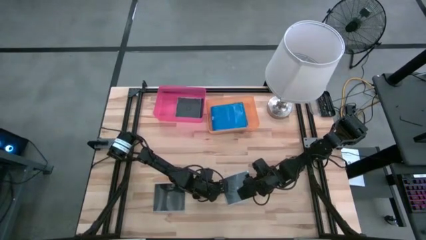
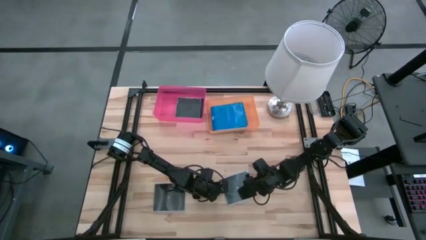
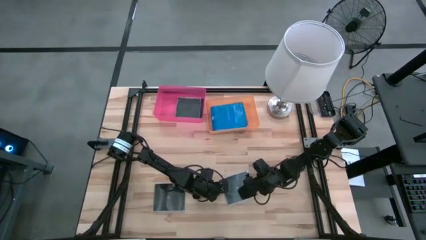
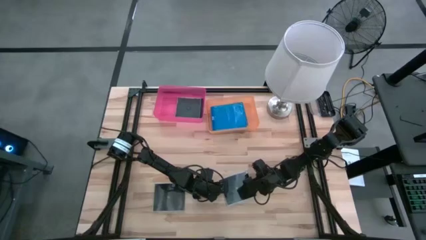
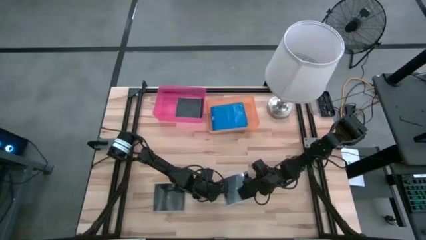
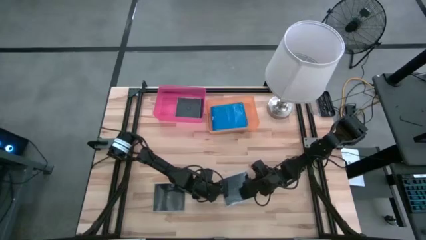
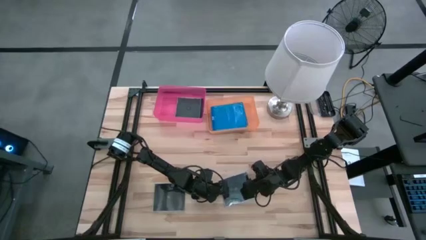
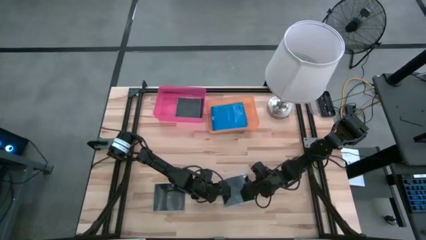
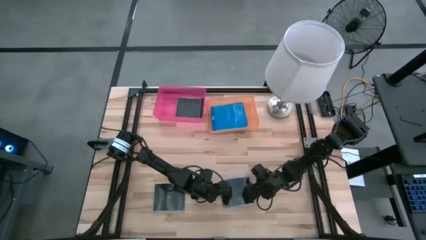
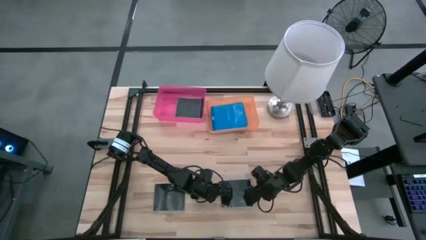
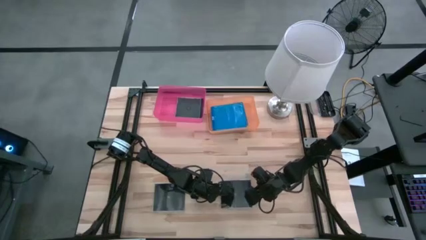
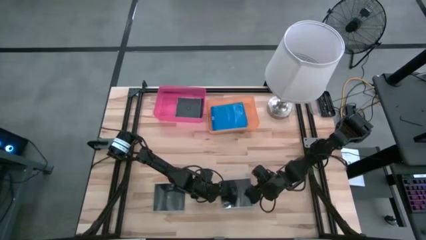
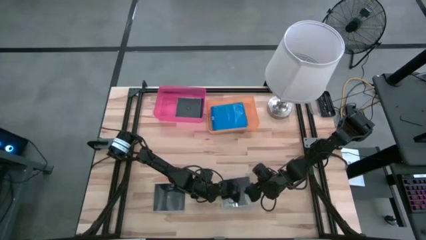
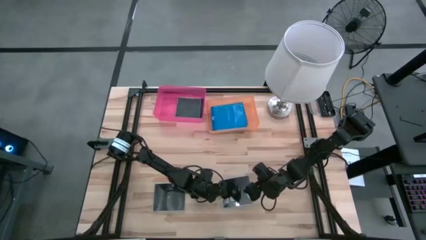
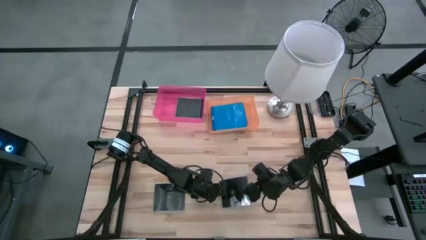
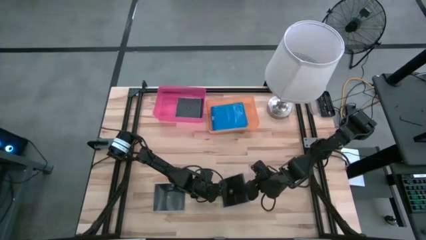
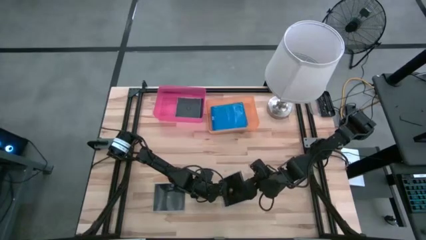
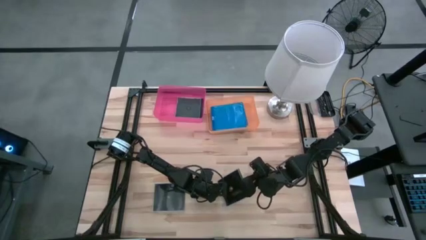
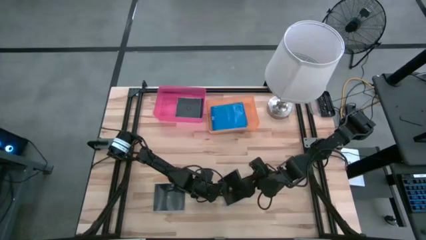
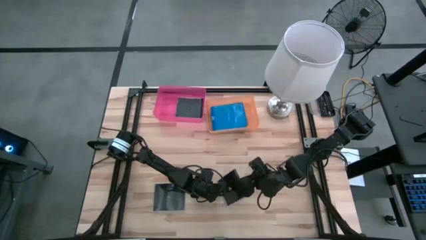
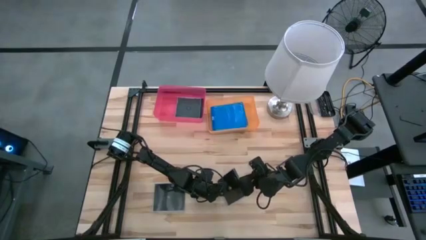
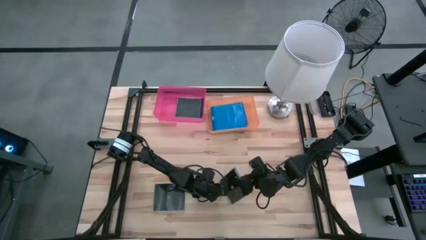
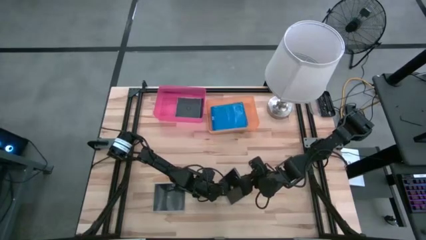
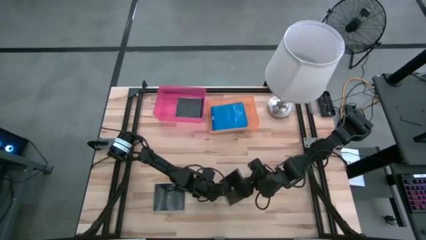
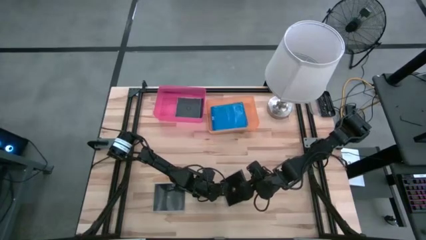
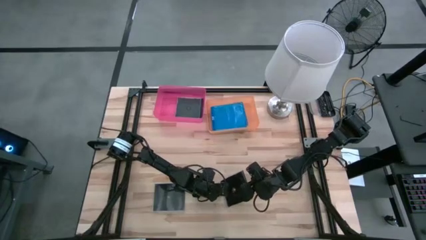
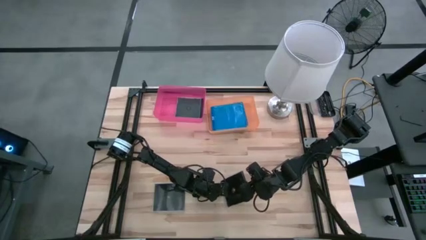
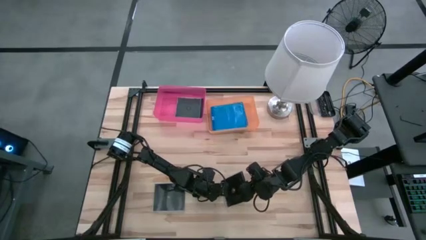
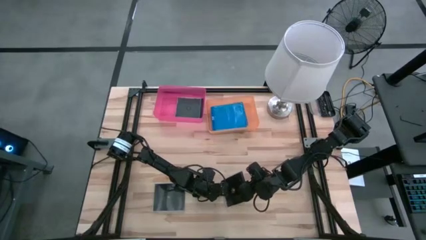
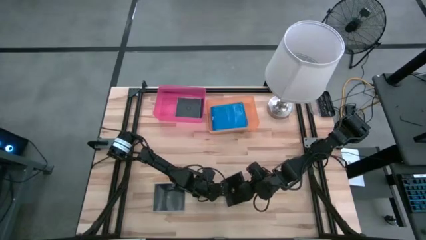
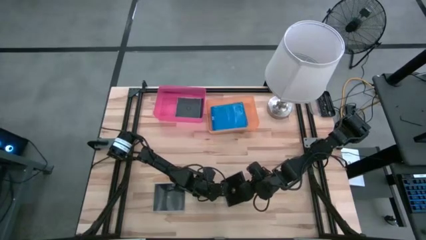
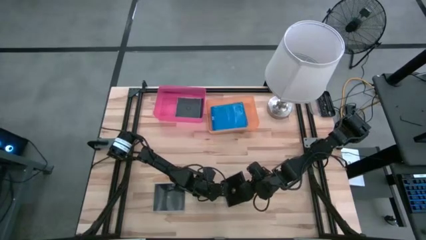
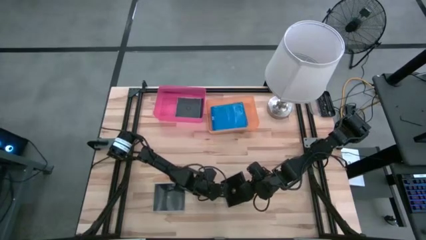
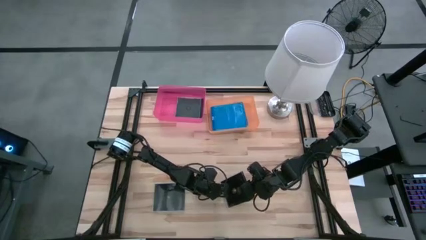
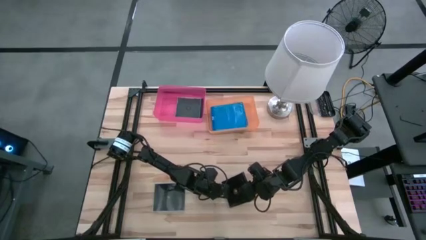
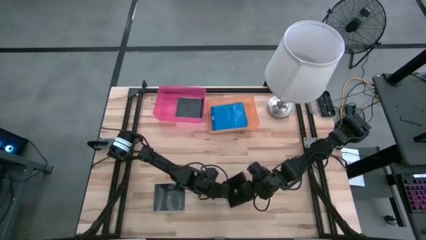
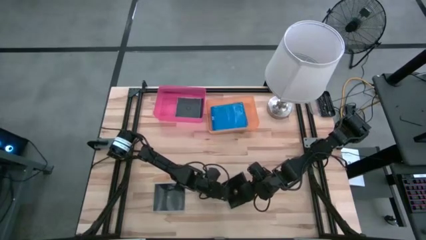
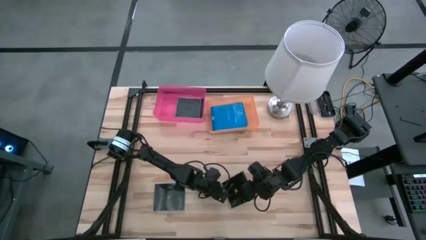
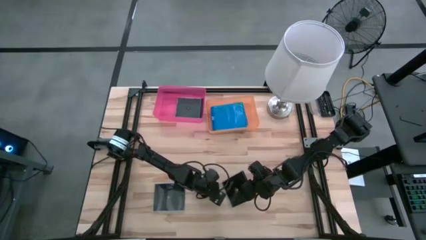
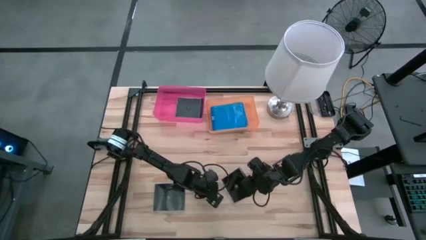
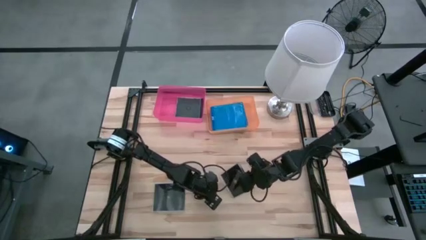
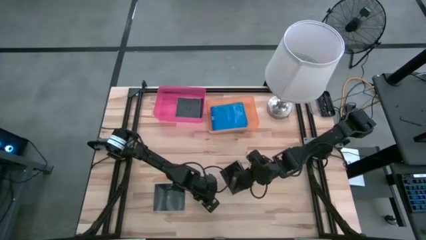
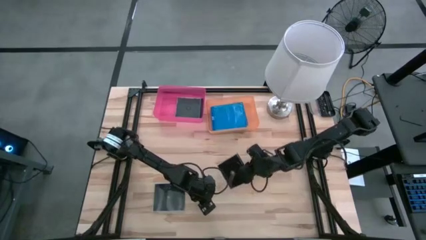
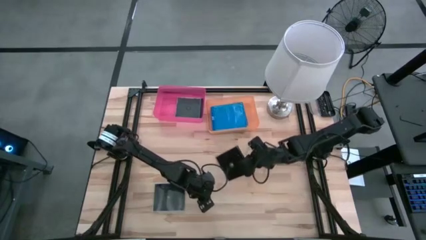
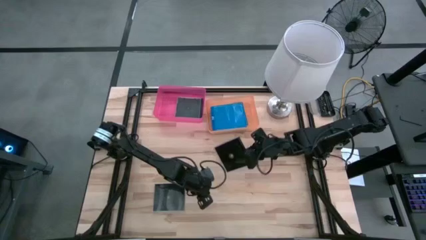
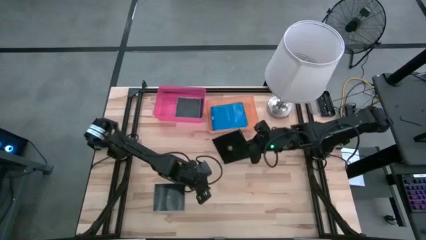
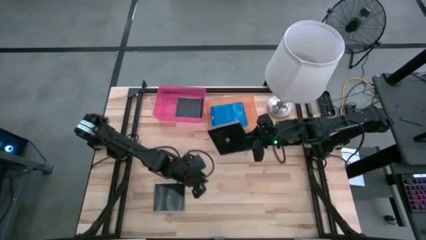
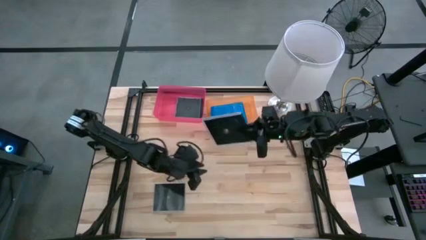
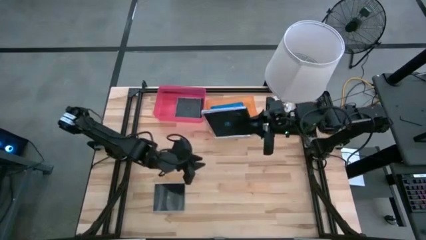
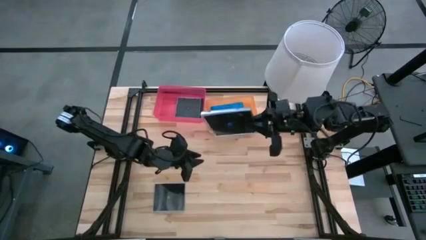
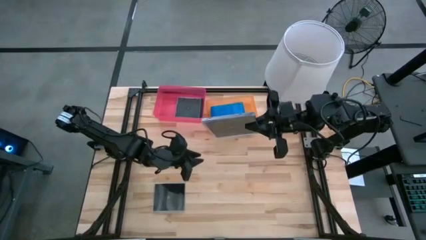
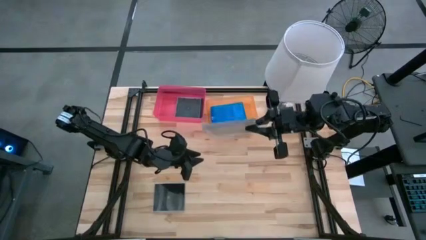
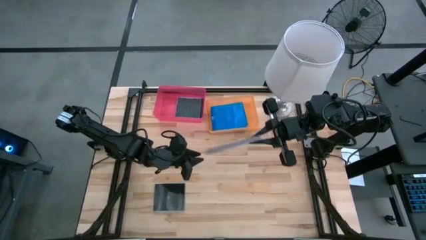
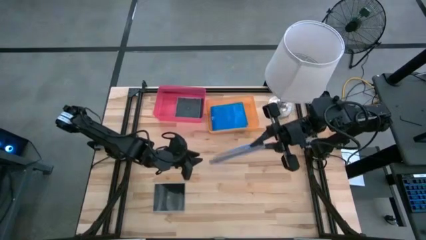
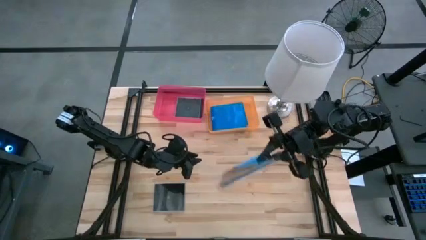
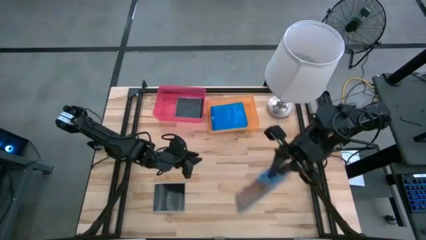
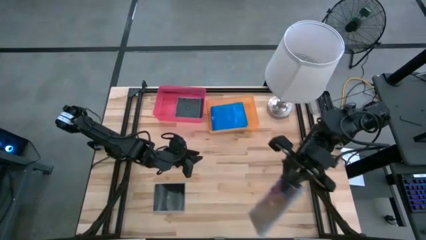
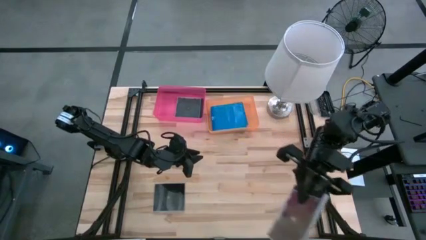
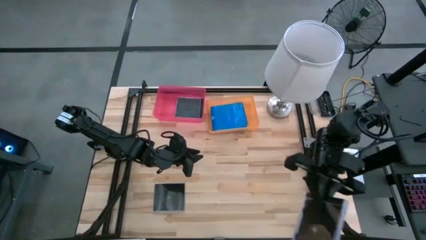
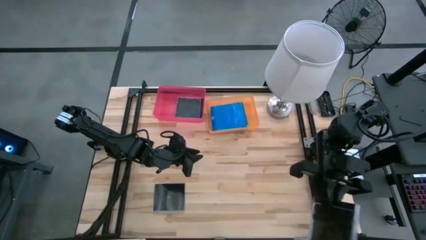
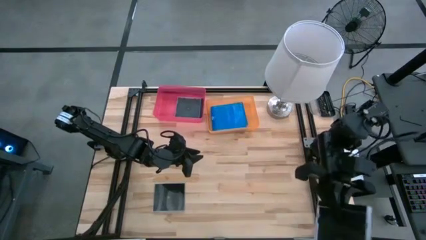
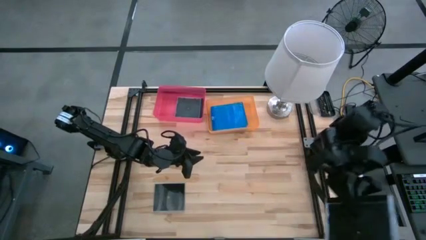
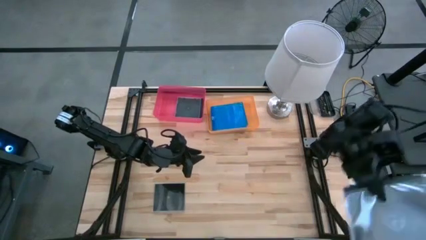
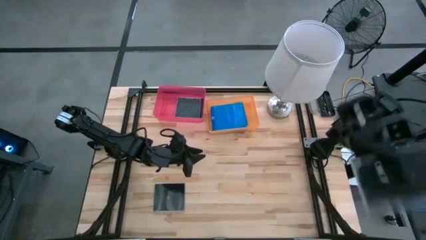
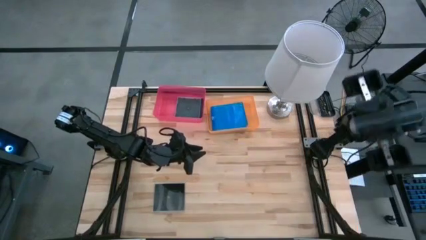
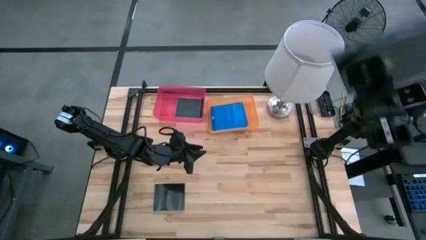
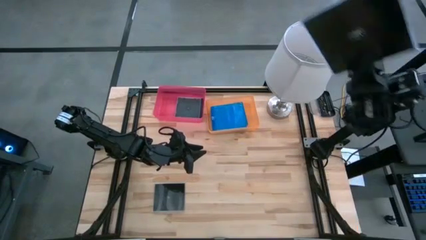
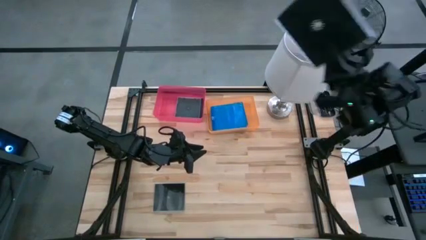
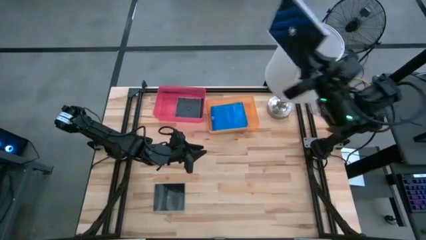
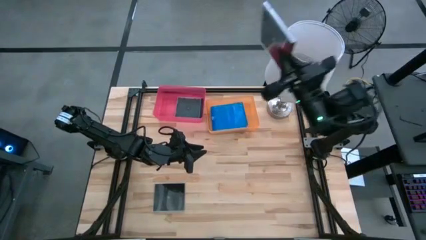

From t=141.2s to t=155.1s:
Task: Pick & place jewel cases by type
Put the right black CD case into the pink bin
